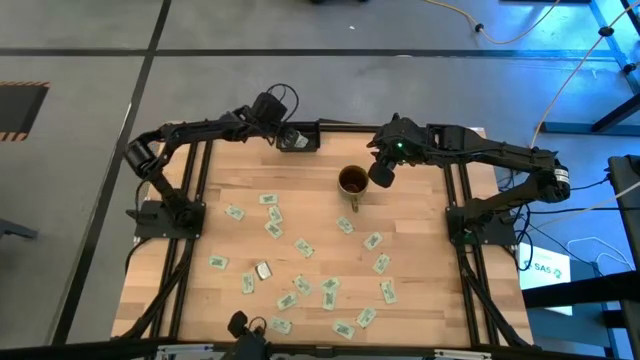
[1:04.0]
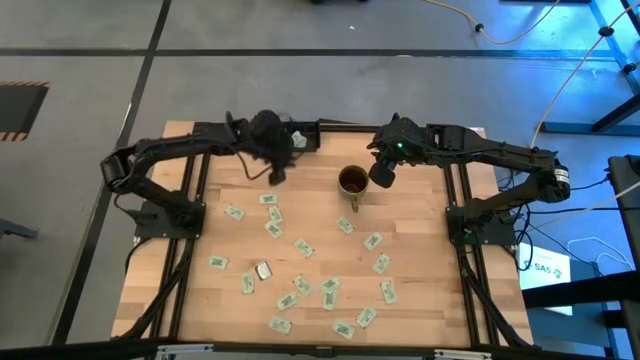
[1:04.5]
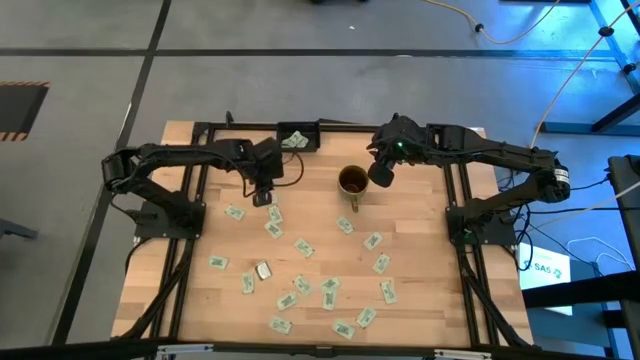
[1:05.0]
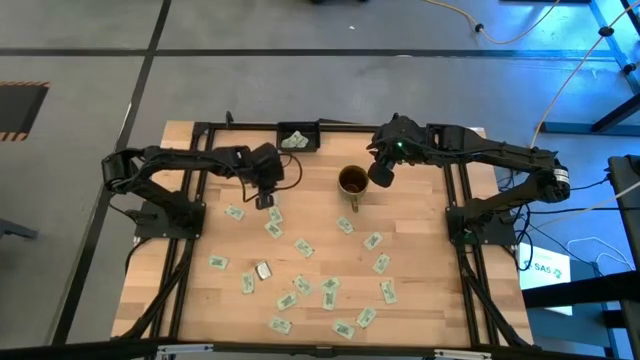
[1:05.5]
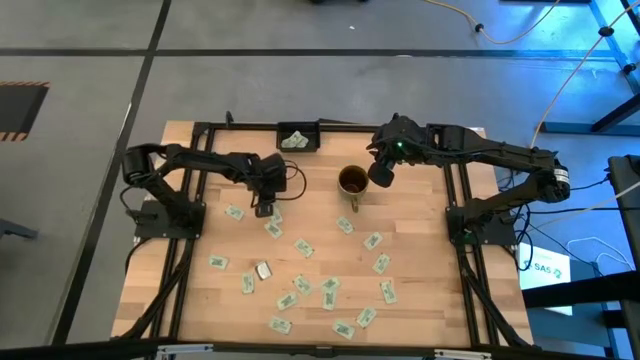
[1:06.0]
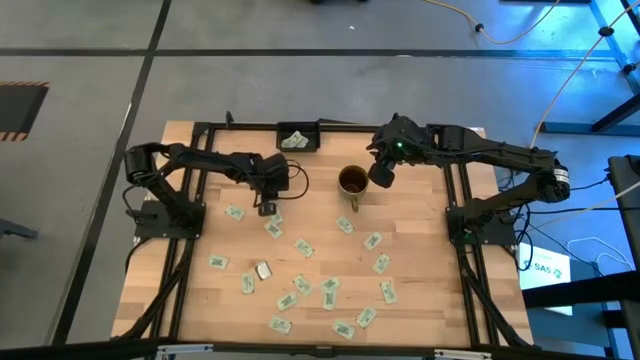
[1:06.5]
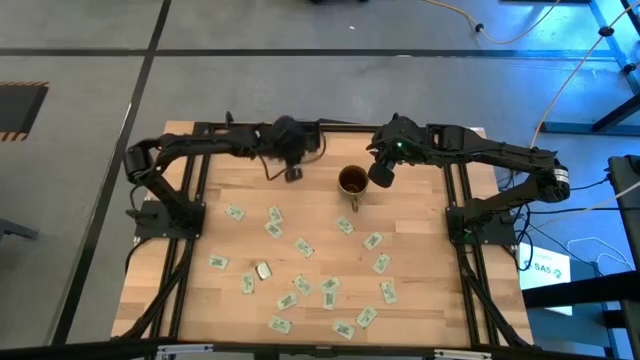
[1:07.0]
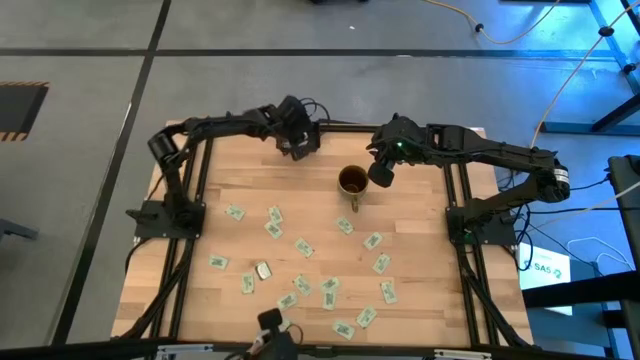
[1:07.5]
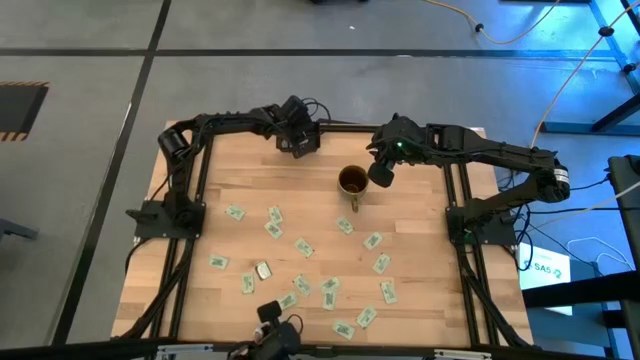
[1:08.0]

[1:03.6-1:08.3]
Task: Pick and place Stevia / Truvia into bins
Put the stevia packet into the black container

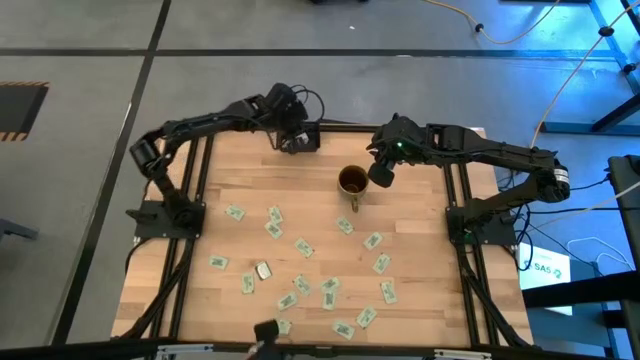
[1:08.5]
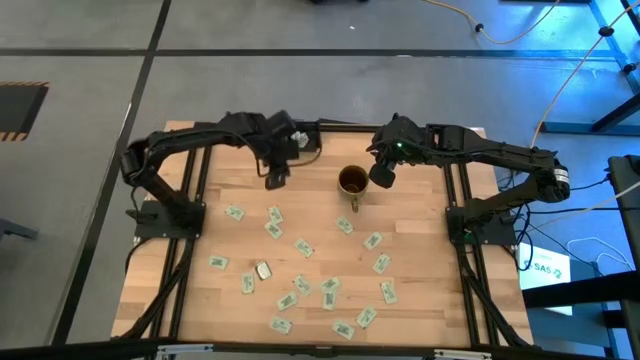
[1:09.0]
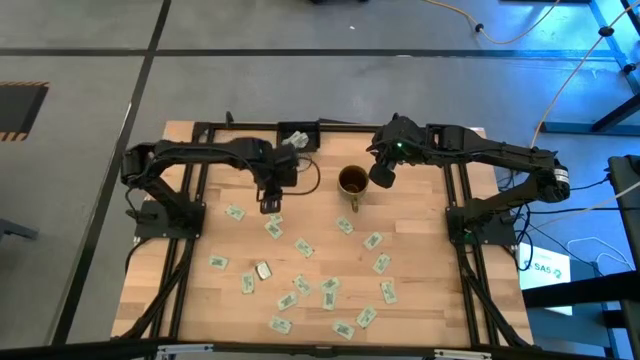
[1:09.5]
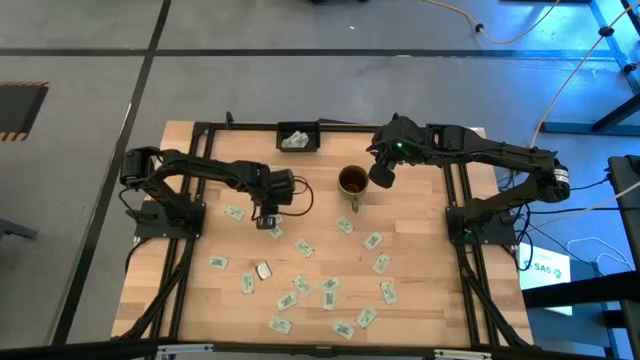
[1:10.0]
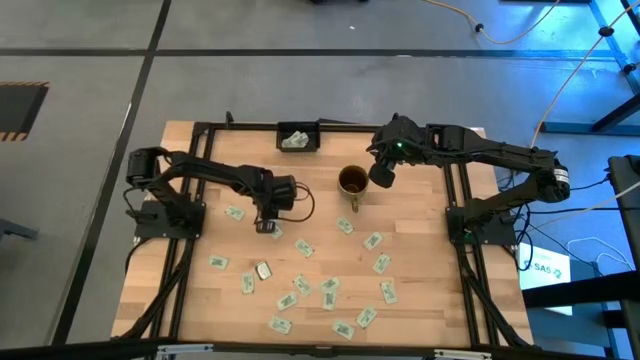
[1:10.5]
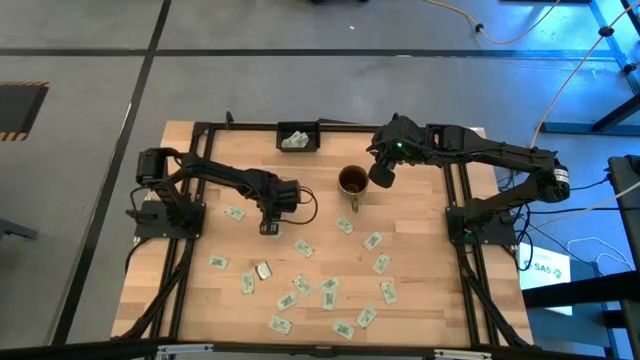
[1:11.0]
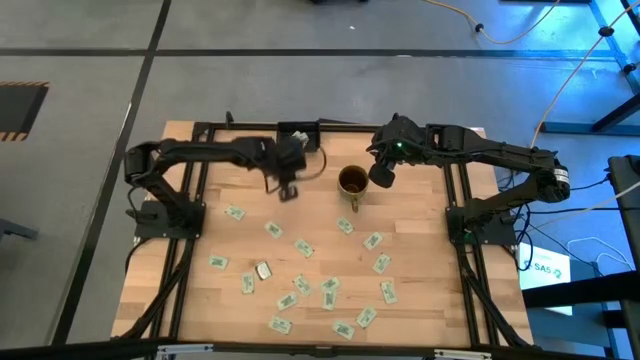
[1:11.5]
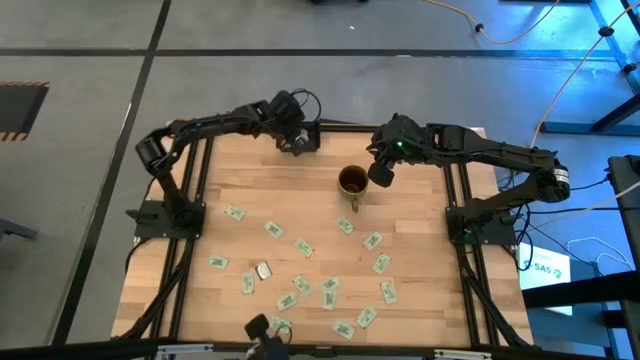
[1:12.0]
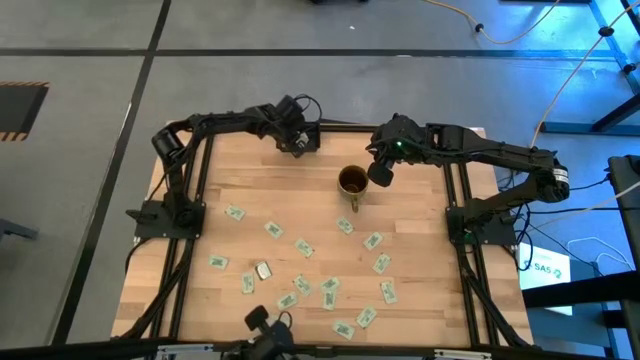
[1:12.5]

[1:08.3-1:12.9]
Put the stevia packet into the black container

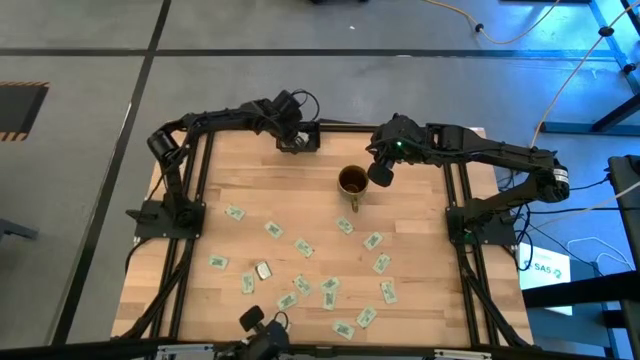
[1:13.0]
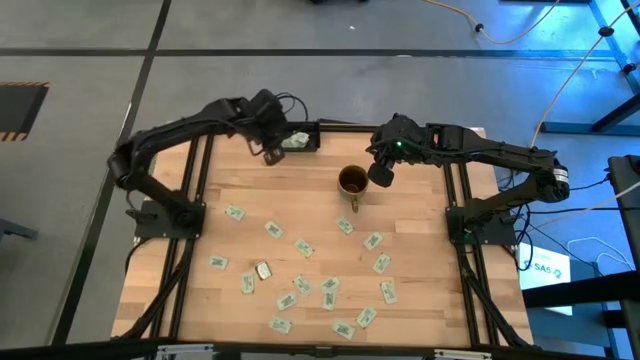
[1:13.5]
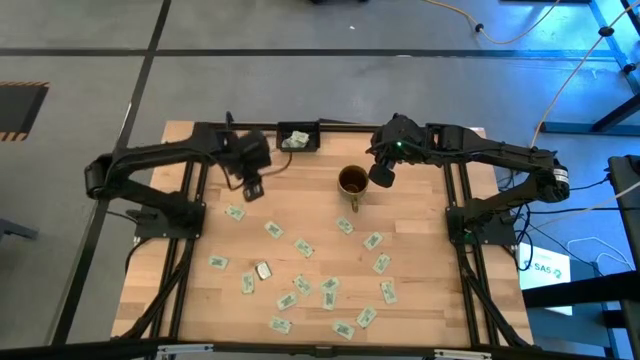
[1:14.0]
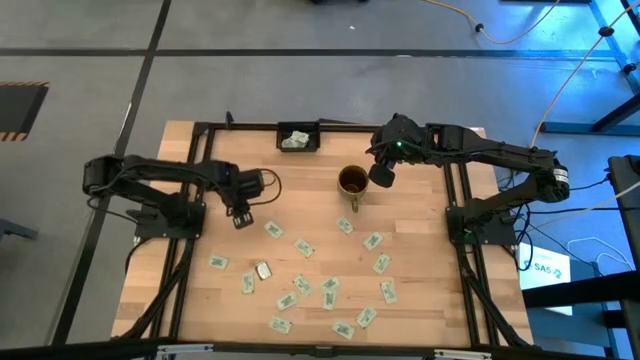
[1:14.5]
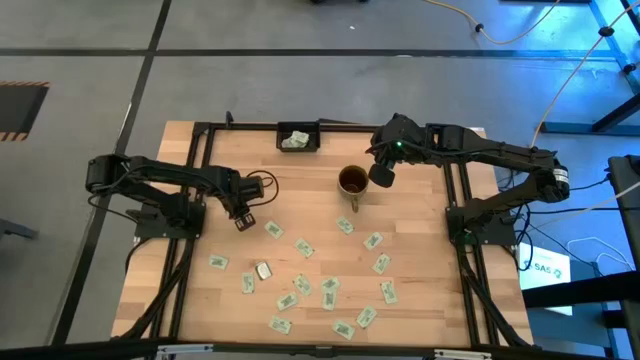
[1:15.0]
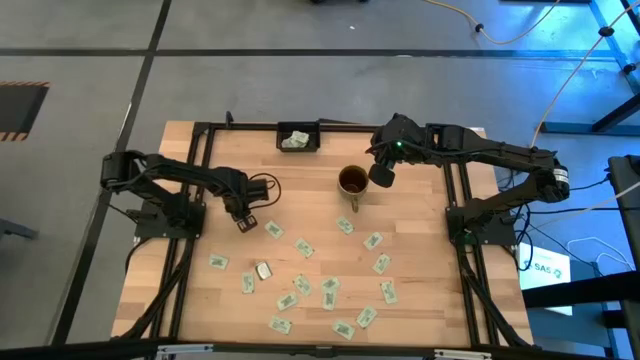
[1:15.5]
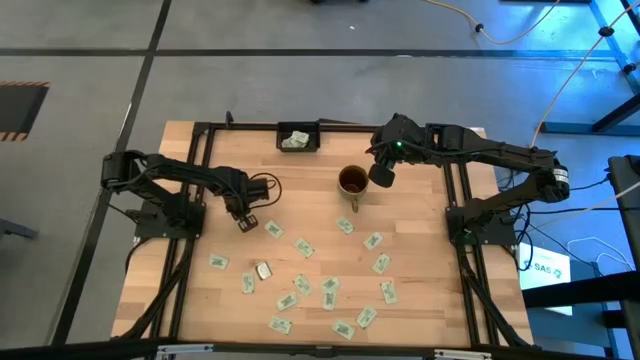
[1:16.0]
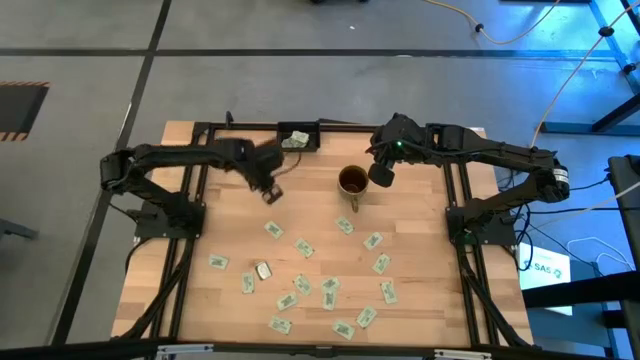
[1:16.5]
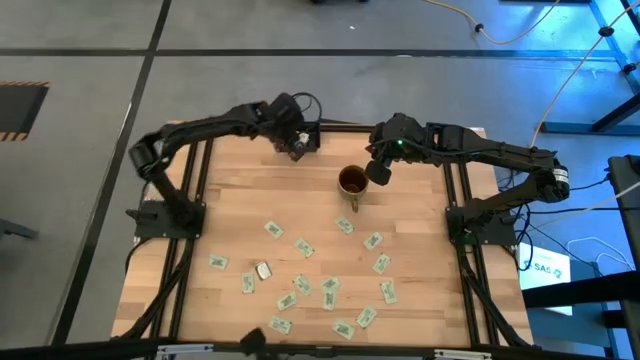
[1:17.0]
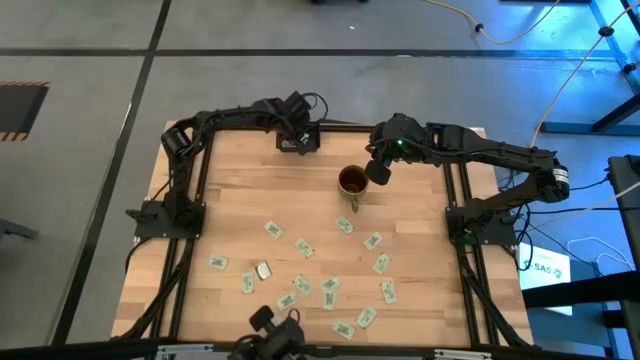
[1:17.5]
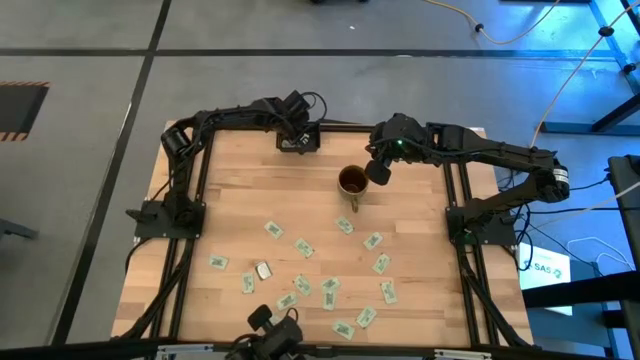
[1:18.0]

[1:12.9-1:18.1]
Put the stevia packet into the black container

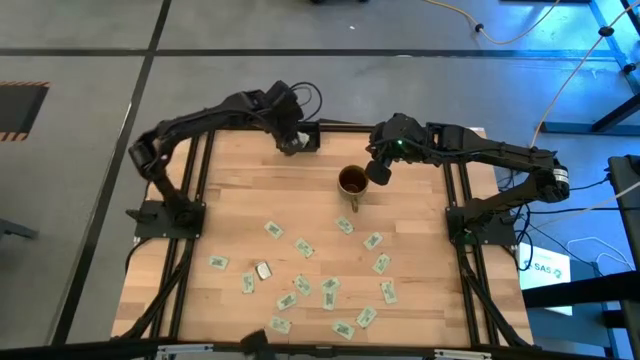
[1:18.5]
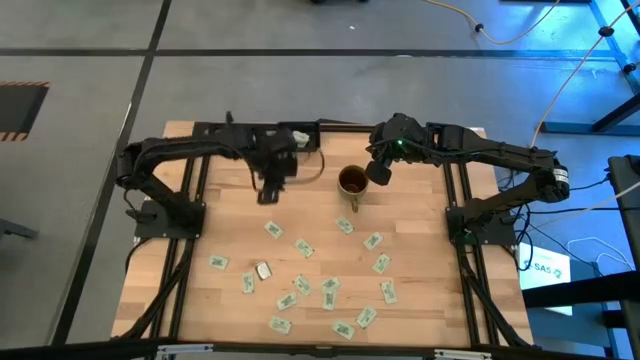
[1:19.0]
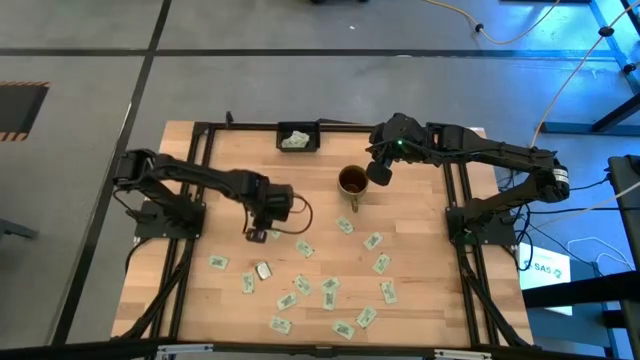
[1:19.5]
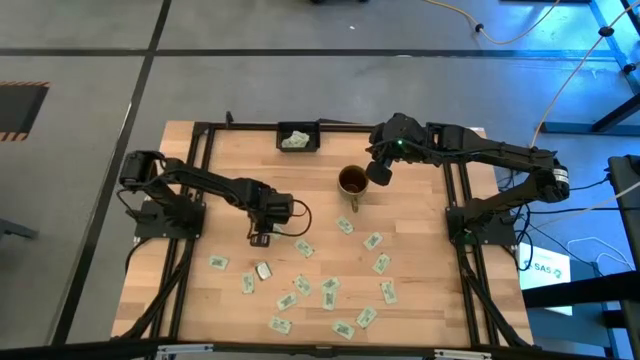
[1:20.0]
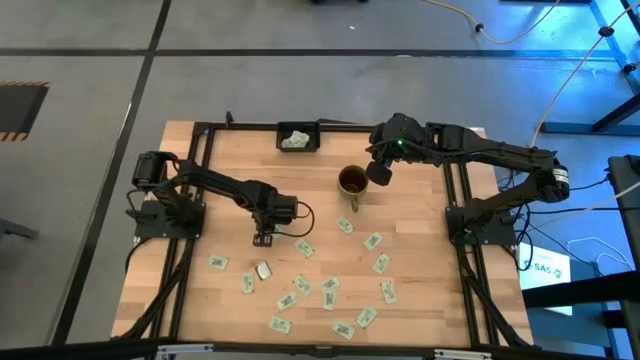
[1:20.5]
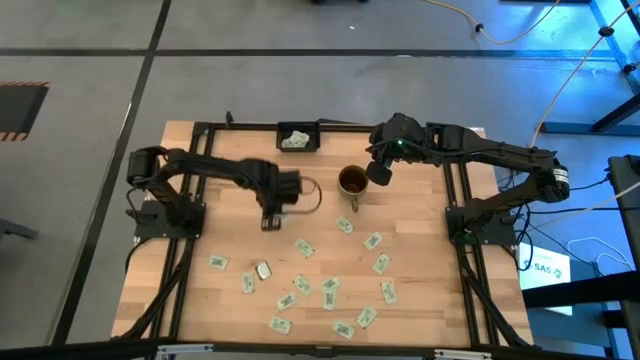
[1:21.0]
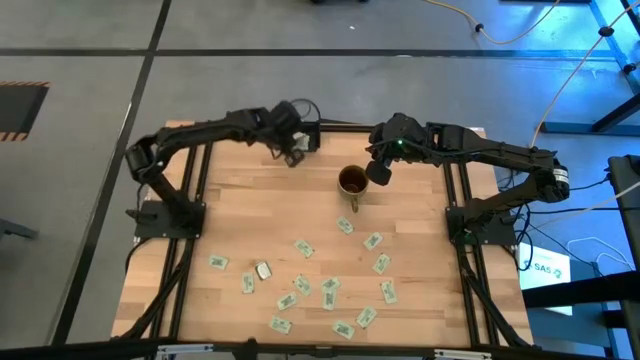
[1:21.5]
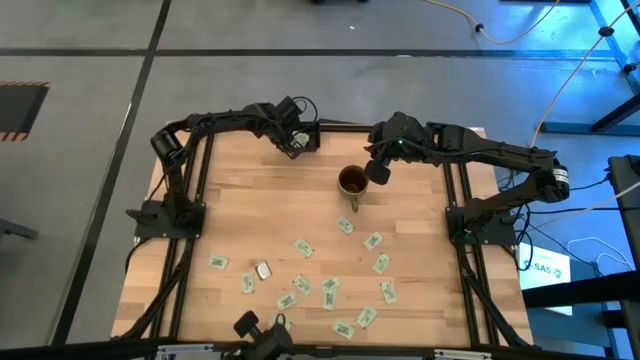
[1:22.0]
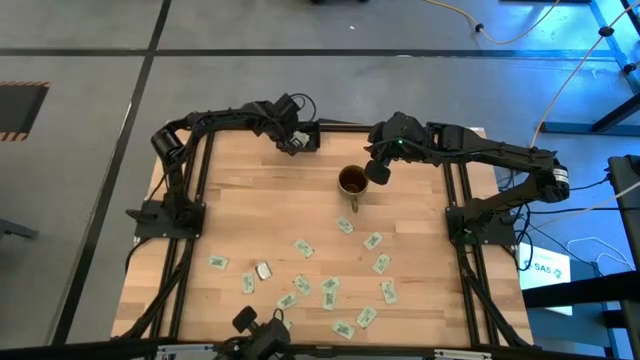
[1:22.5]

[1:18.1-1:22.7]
Put the stevia packet into the black container

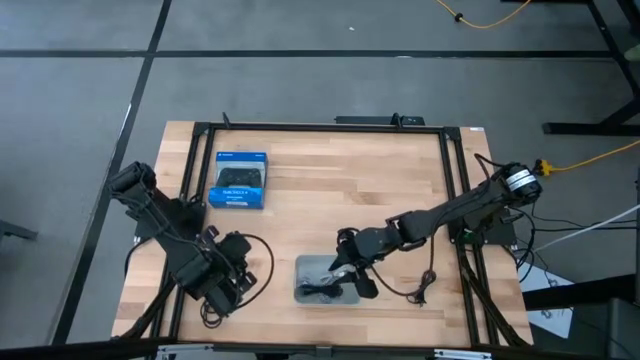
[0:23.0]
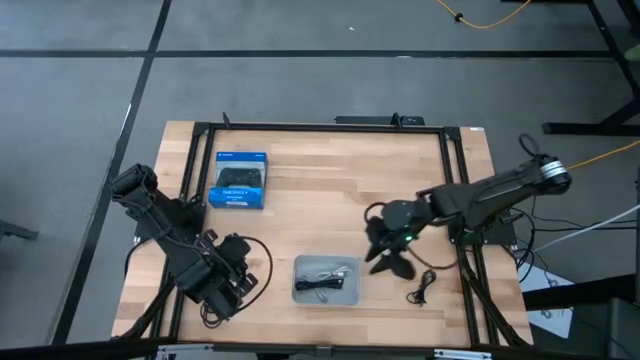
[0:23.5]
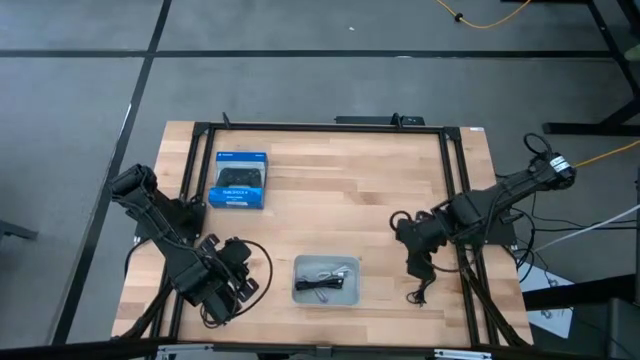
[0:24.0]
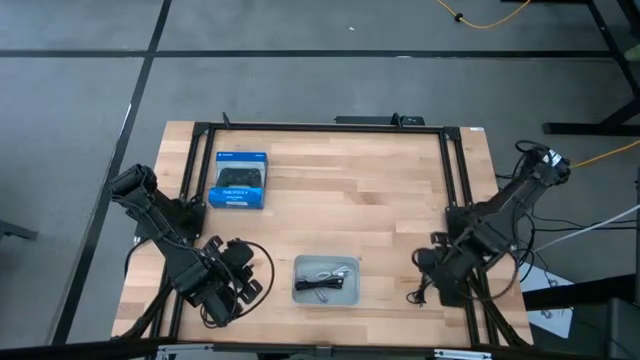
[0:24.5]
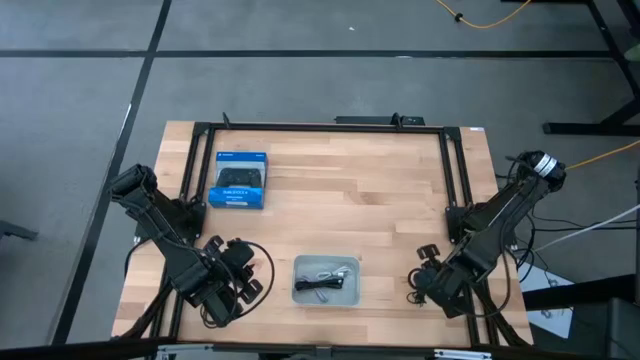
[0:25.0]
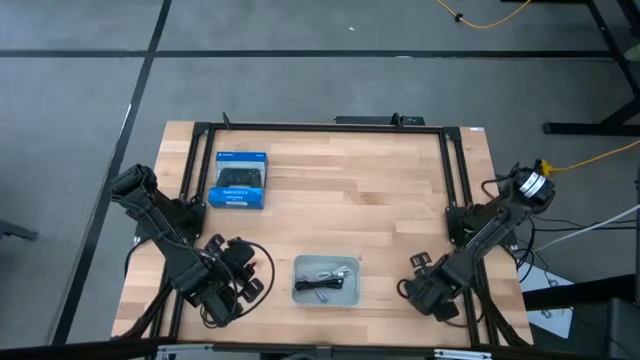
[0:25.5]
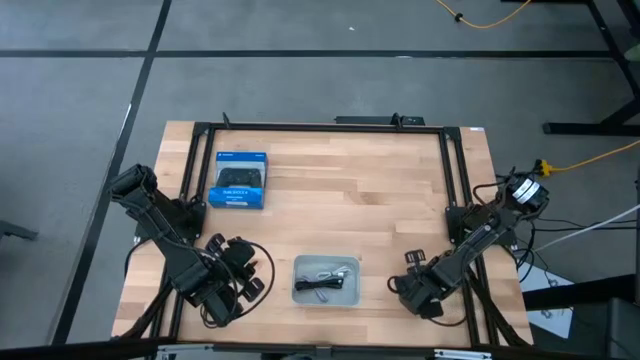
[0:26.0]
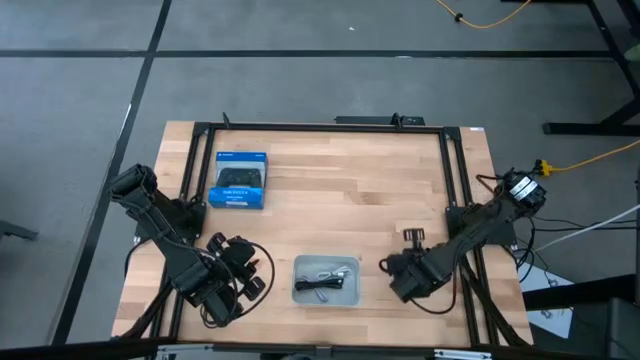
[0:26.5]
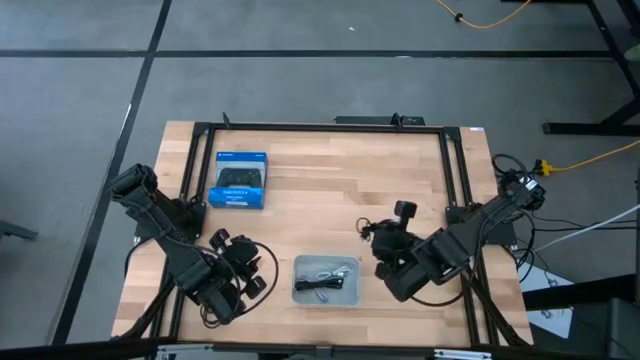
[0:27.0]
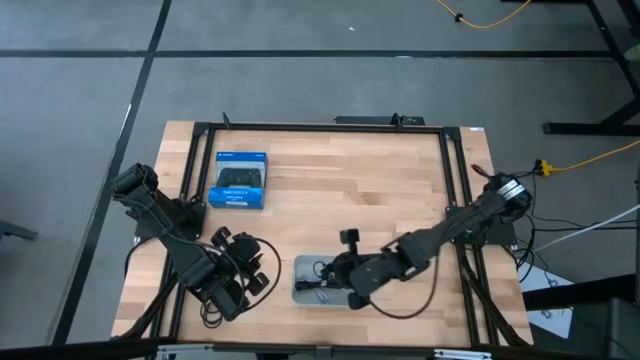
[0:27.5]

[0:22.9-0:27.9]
Task: Pick and place USB-C Cables
Put the black charger cable into the gray bin
